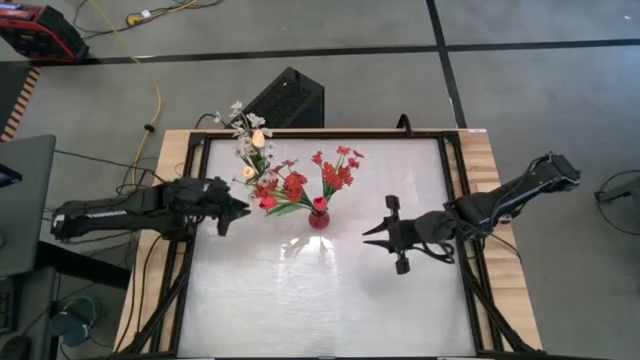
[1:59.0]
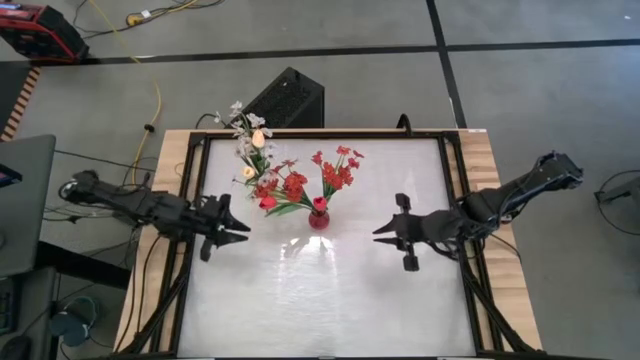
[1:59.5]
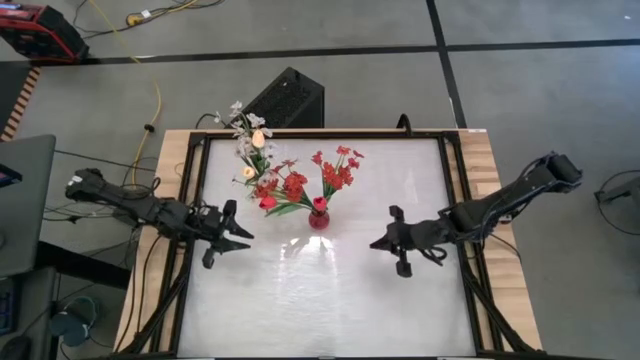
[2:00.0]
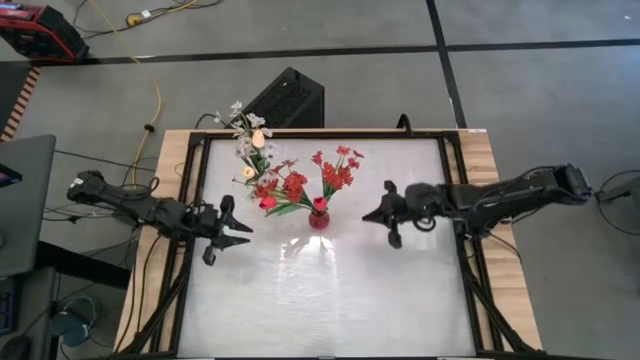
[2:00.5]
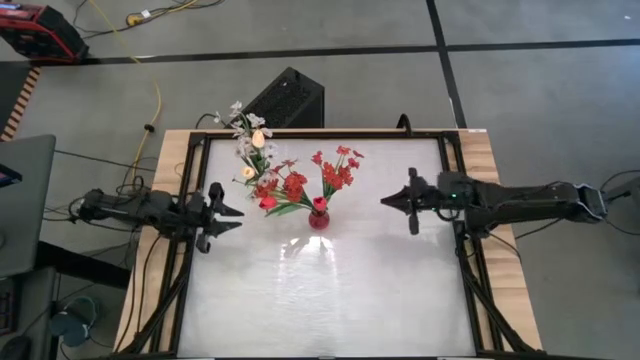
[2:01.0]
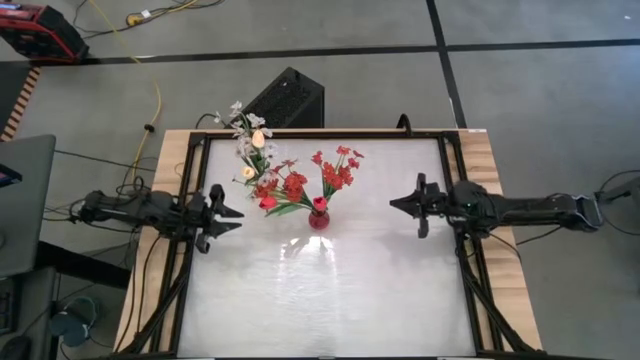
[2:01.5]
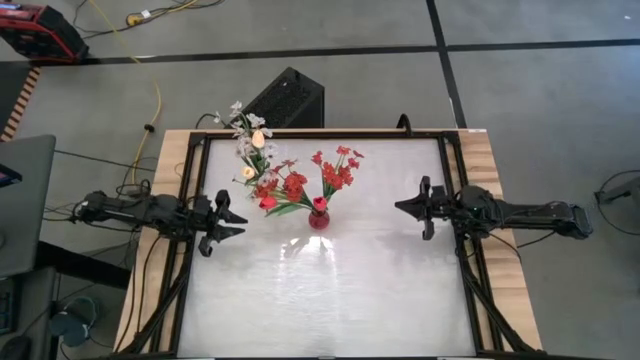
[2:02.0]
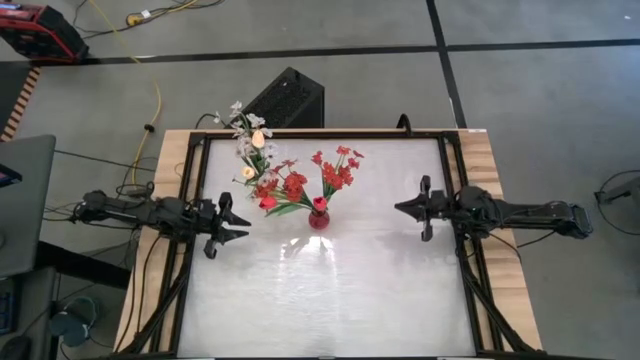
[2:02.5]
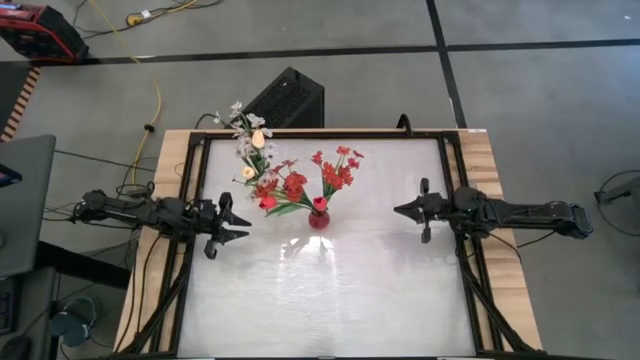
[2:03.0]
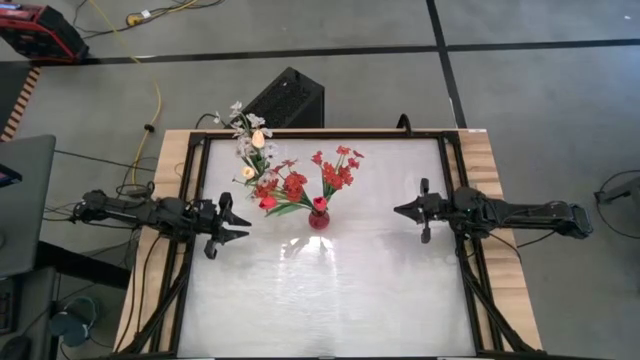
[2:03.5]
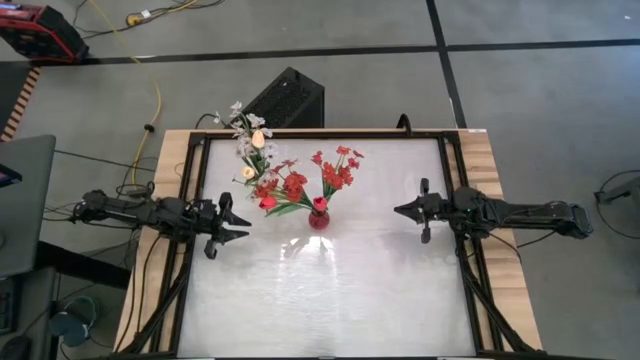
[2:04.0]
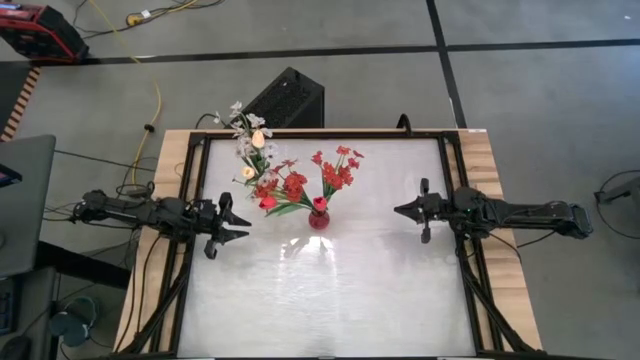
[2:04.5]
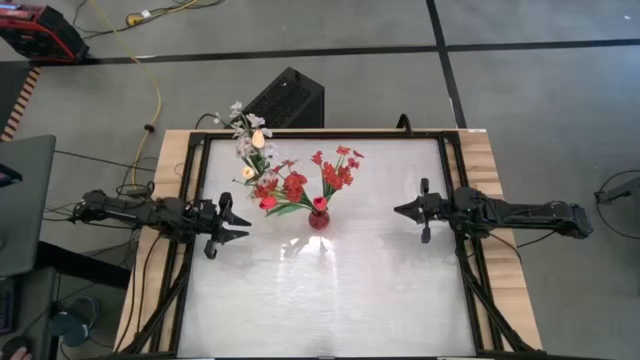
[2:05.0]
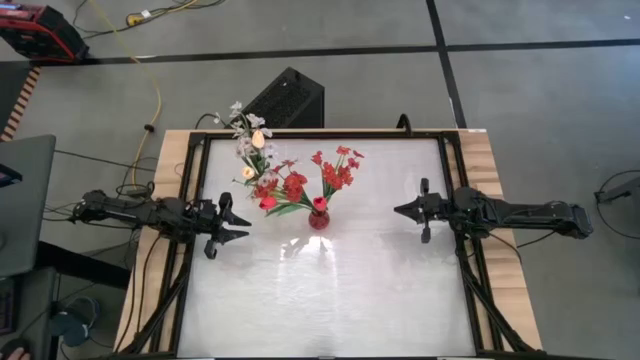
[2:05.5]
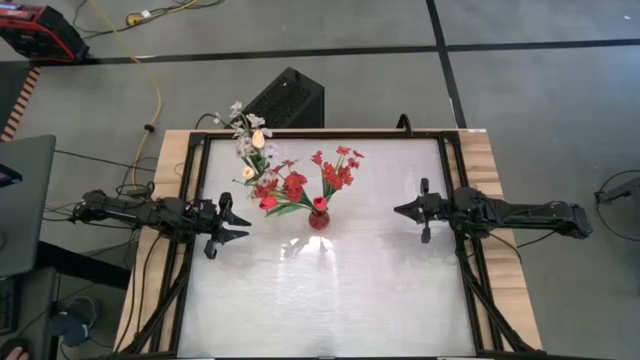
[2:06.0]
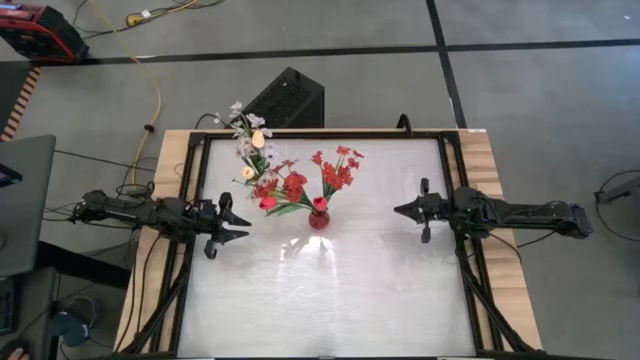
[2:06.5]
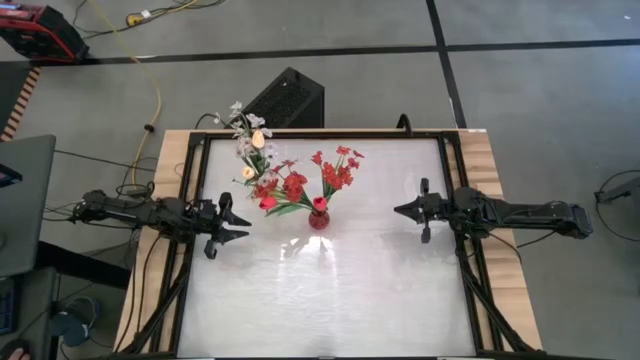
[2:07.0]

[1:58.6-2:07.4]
Task: Sort flowers into vase by color
Return to Home Position

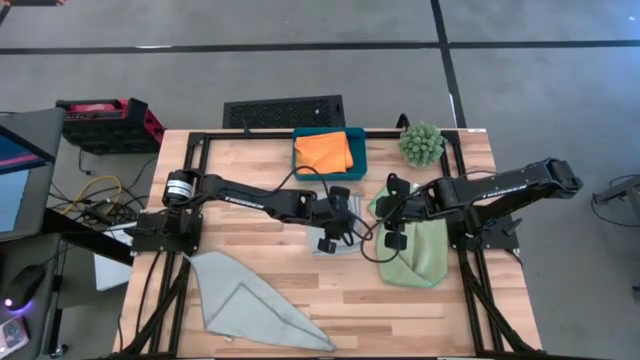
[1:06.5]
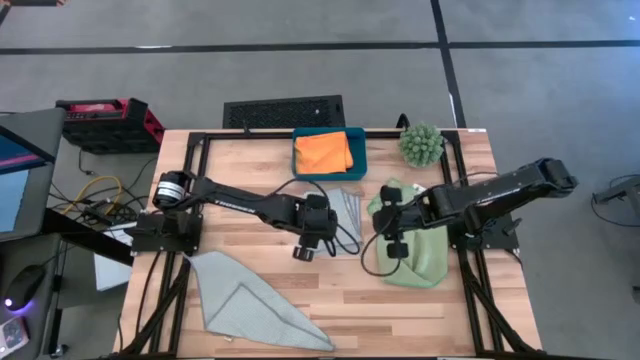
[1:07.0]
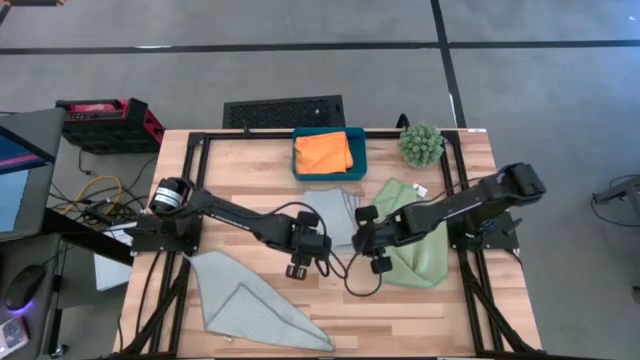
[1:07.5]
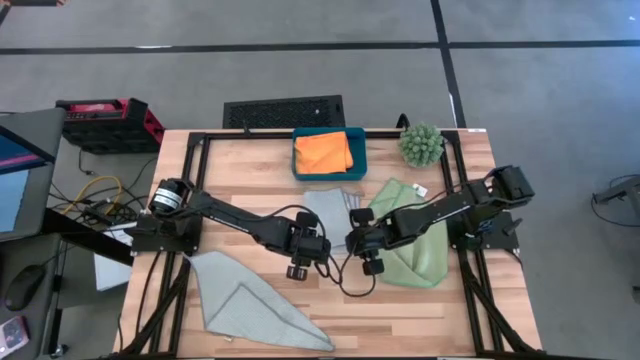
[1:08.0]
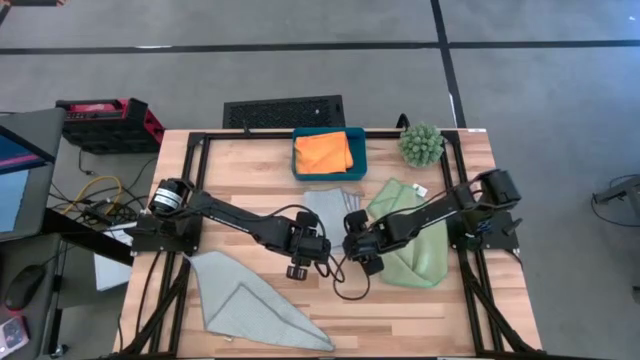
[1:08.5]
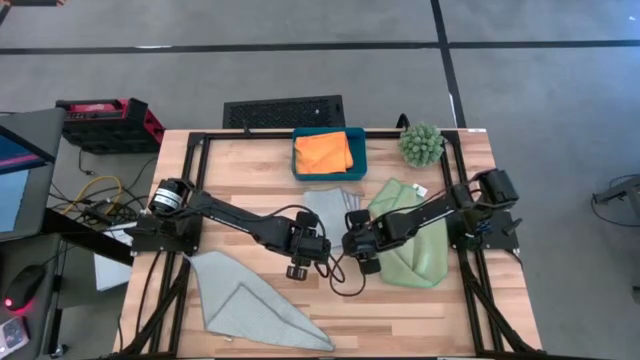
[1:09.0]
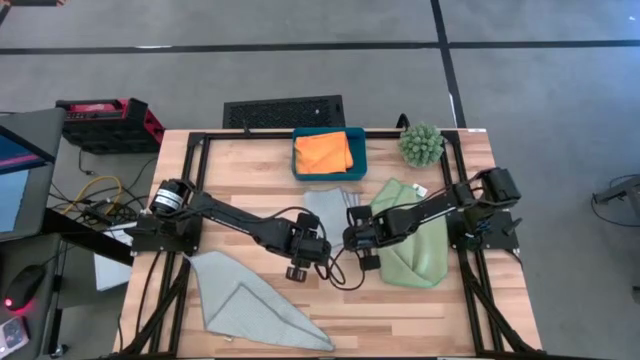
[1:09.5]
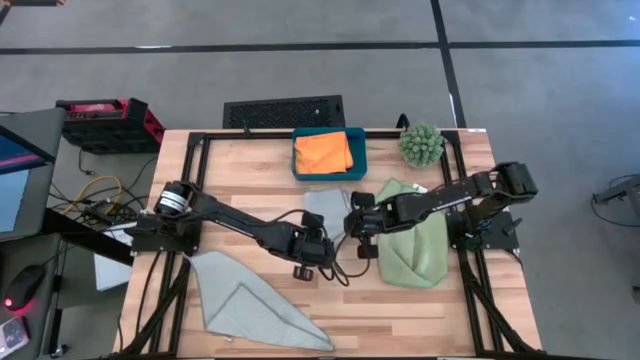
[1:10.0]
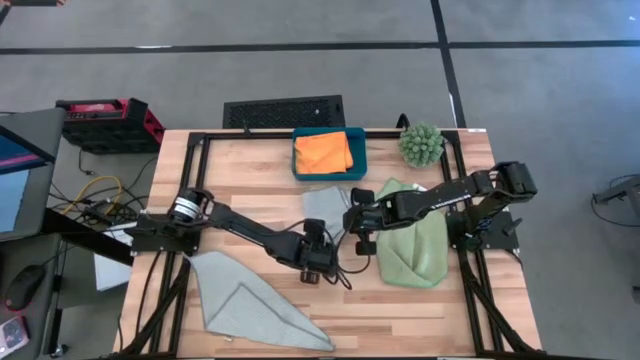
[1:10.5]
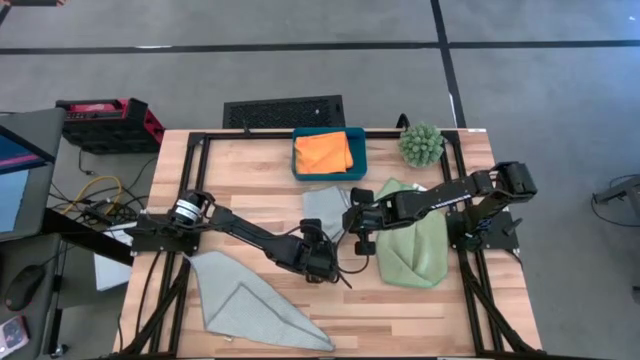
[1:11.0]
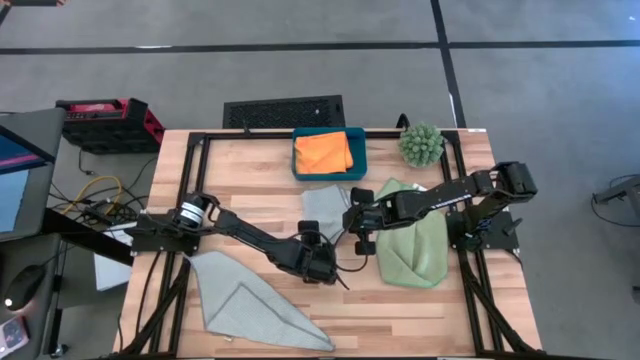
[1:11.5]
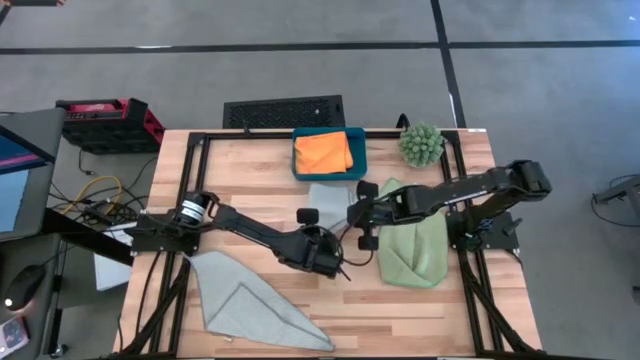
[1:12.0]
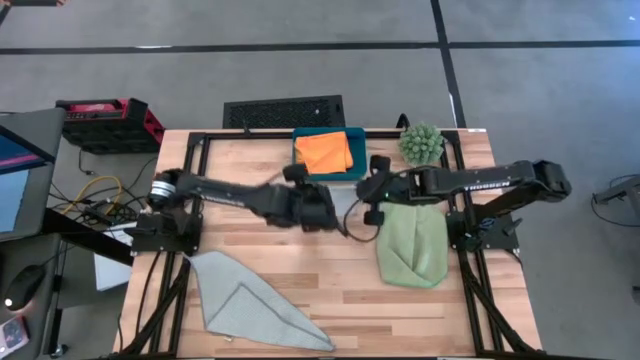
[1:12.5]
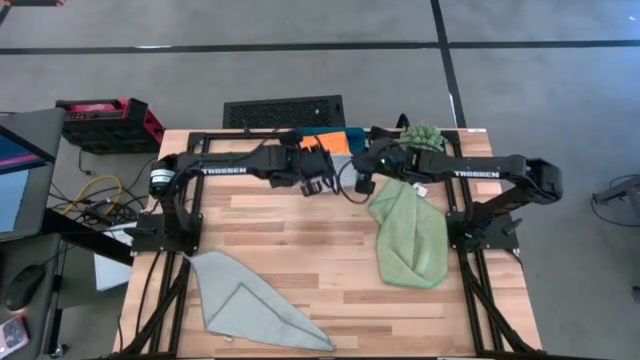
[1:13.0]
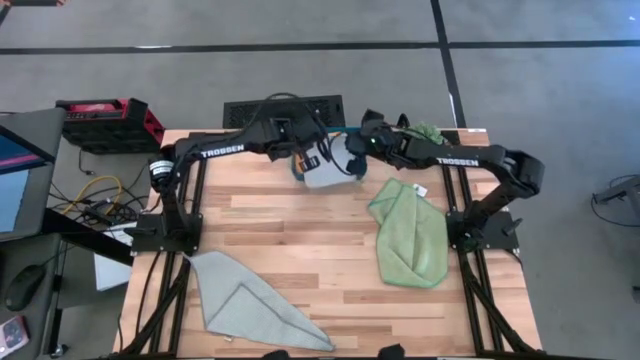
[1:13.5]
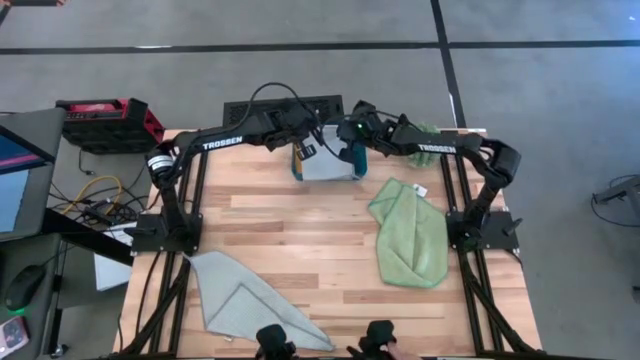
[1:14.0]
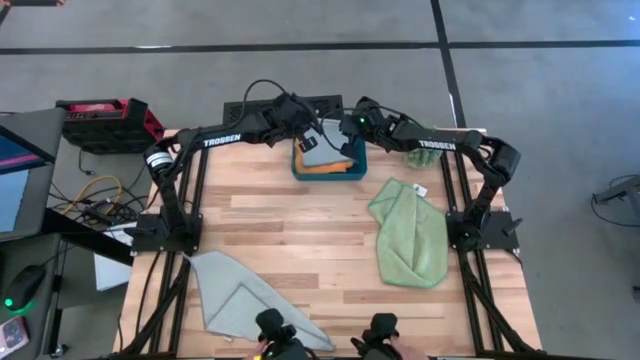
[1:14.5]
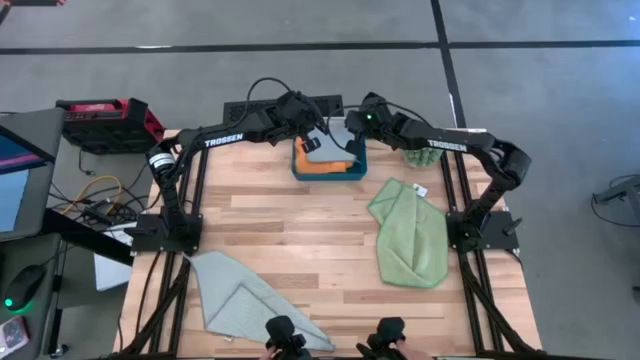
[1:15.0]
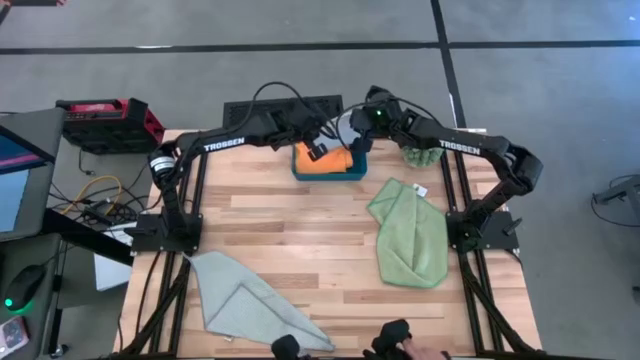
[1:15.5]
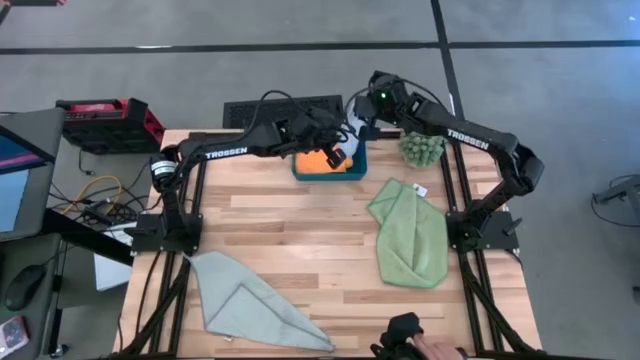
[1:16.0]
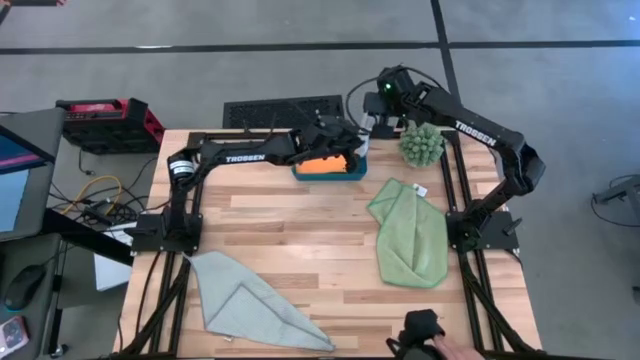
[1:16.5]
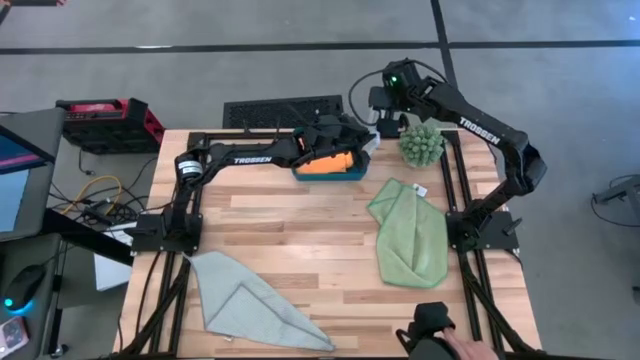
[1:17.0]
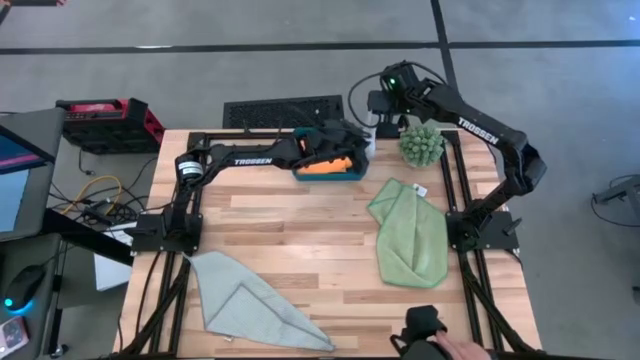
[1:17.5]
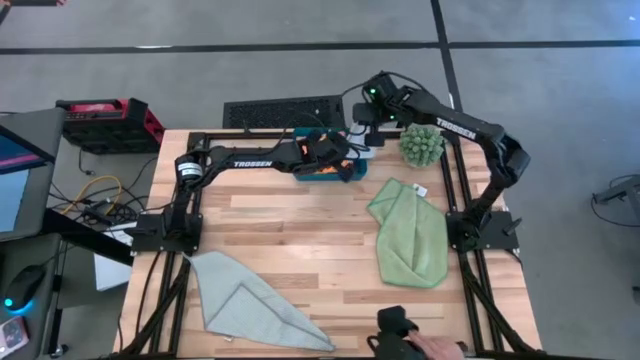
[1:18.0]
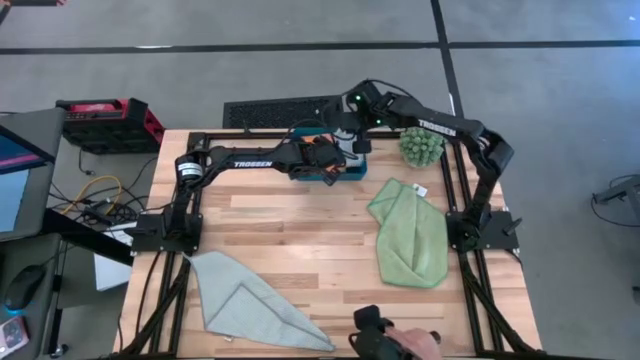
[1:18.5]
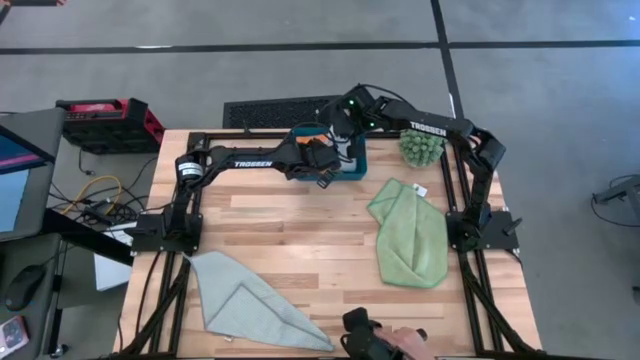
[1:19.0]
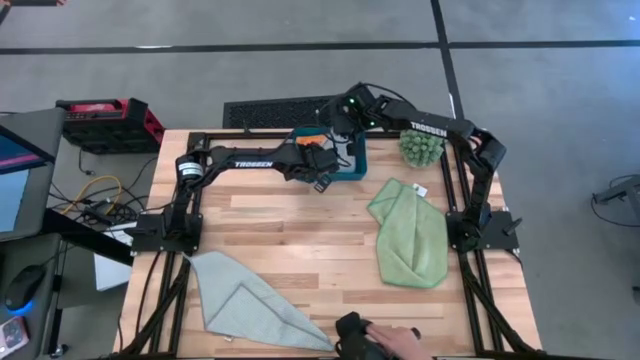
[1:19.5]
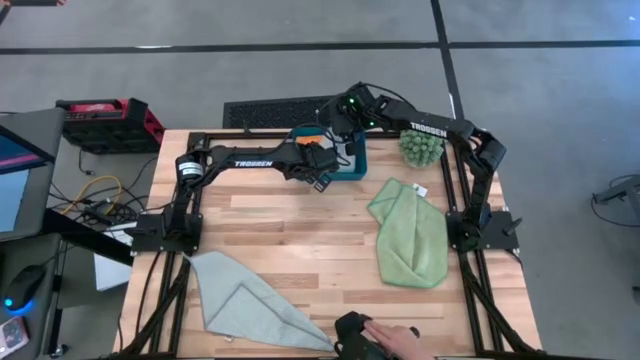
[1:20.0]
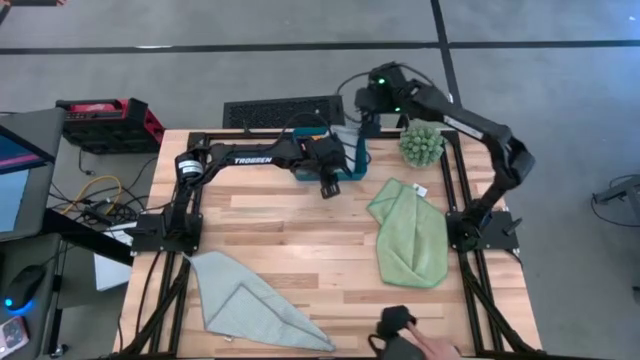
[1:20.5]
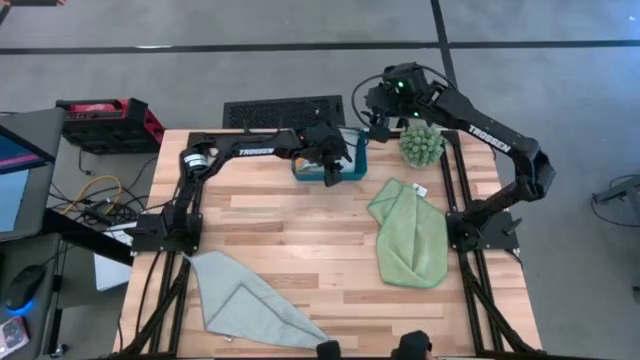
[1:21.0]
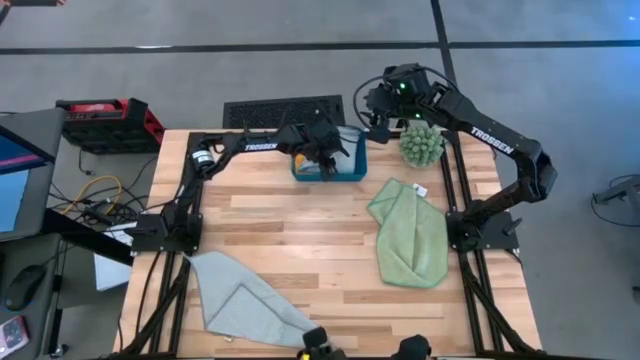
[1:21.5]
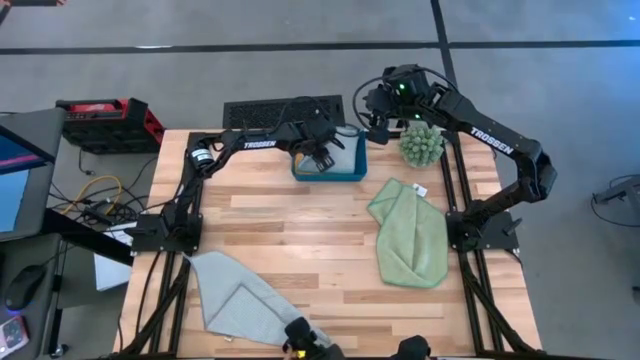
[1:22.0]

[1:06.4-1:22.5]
Task: Fold microfiber towels
Put the top gray microfiber cloth in the blue bin
